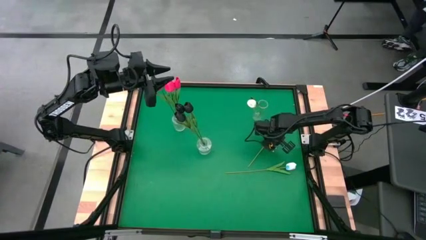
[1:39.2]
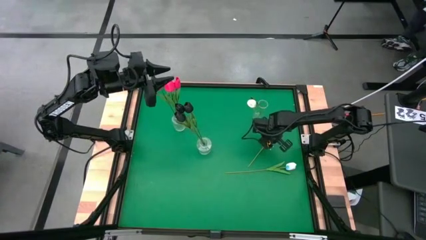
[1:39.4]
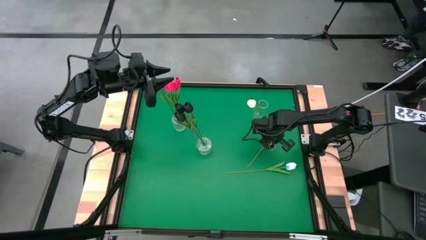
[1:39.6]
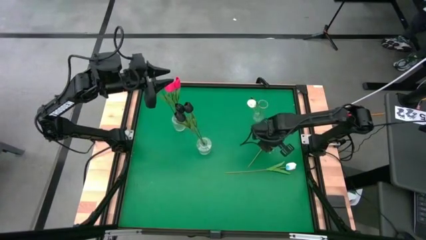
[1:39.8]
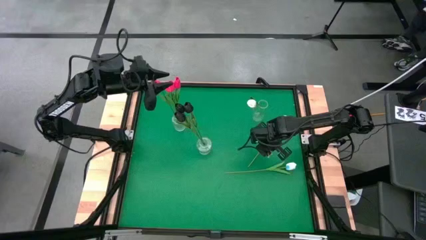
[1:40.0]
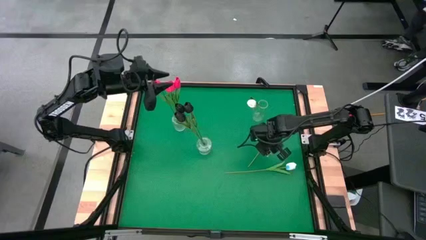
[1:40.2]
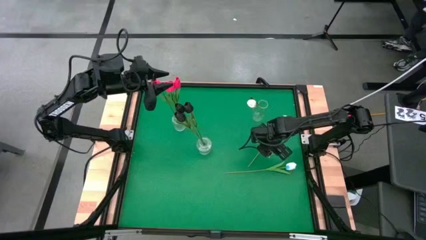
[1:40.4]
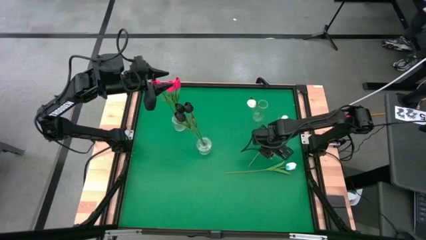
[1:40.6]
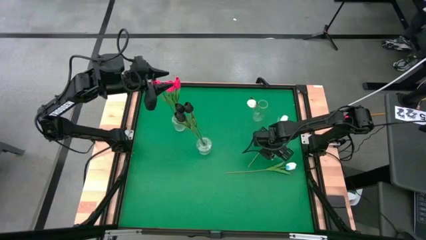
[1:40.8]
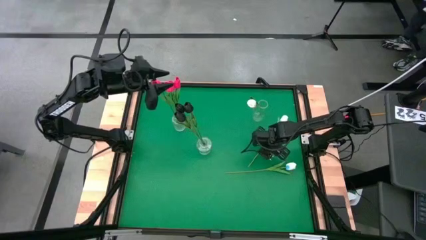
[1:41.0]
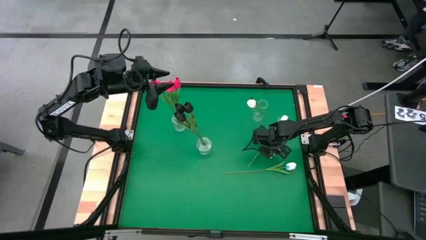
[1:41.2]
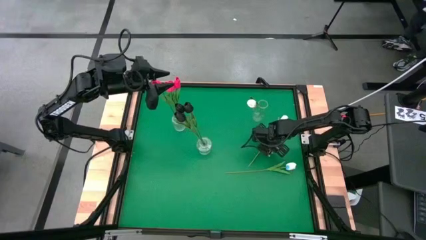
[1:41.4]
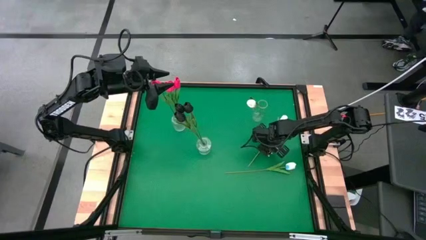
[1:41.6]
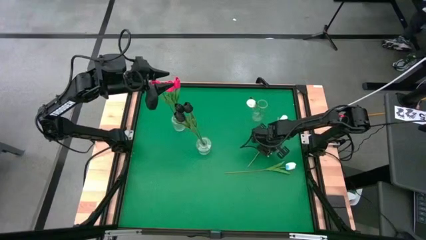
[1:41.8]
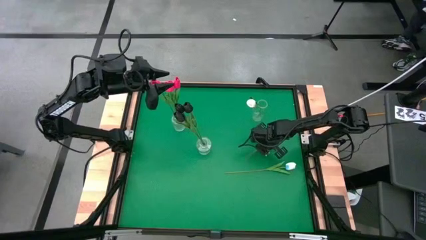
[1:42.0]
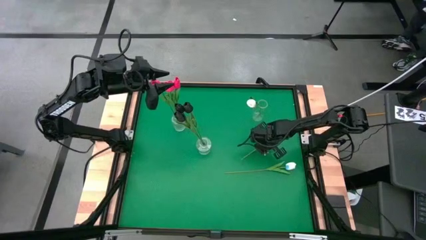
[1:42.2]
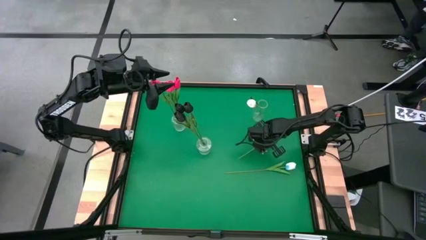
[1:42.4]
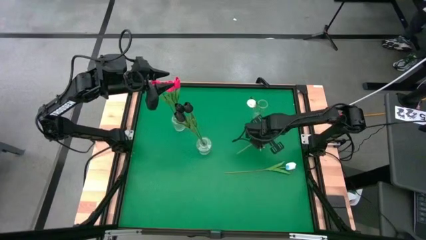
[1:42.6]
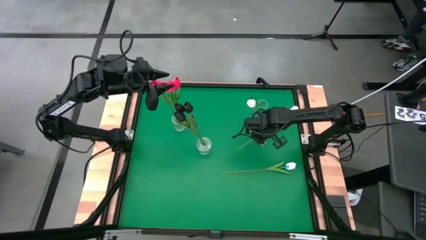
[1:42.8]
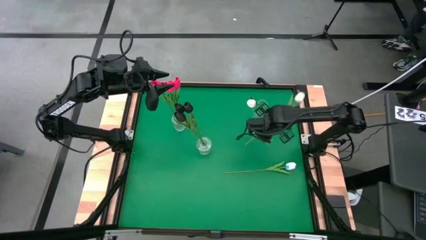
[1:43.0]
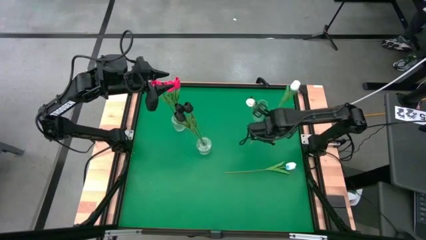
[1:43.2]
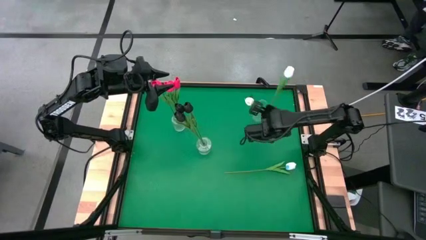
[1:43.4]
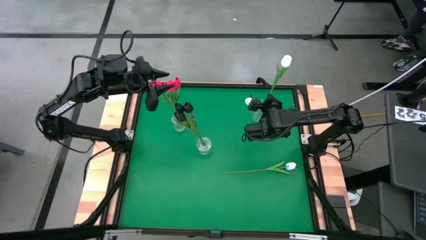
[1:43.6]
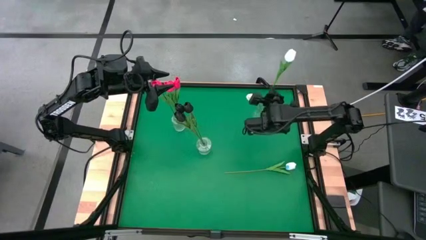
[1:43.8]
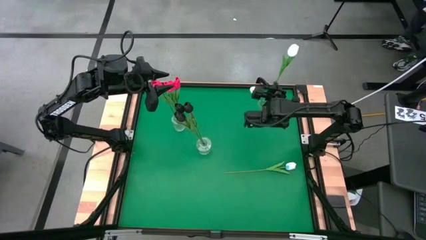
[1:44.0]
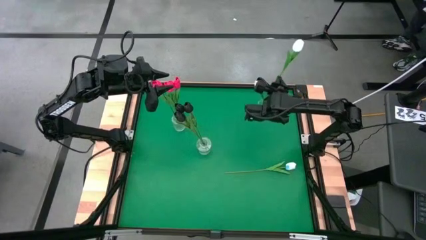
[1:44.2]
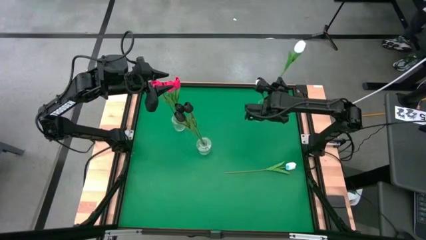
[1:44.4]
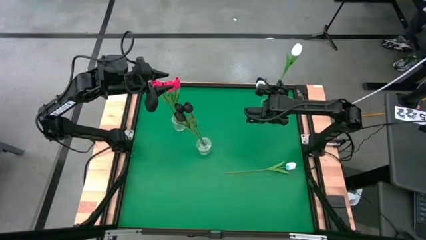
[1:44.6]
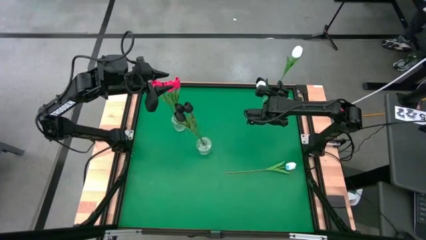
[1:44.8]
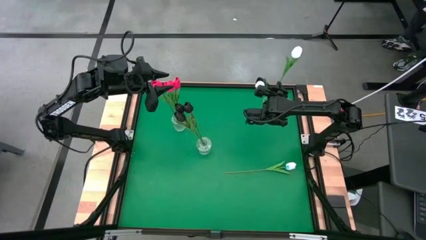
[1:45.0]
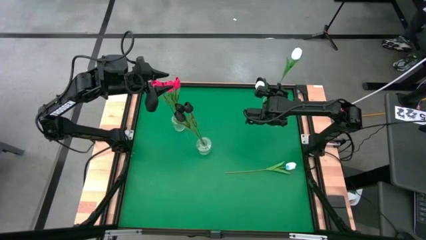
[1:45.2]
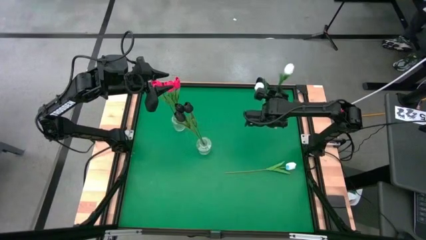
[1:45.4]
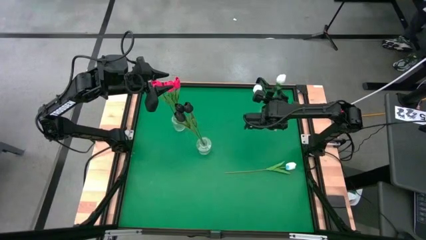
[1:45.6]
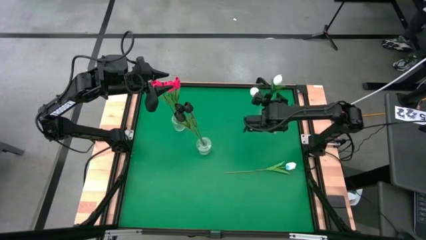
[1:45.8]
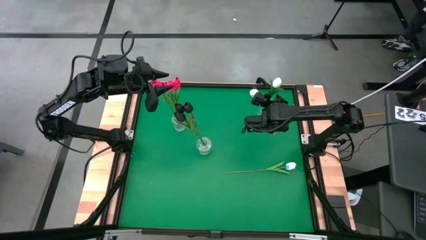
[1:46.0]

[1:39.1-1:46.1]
Task: Sort flowers into vase by color
Put the top white tulip into the top right transparent vase

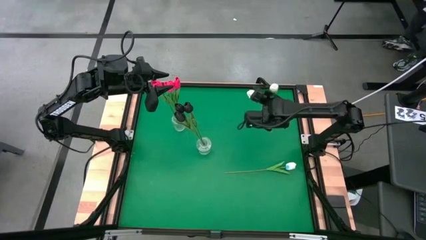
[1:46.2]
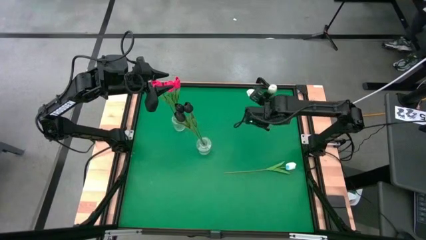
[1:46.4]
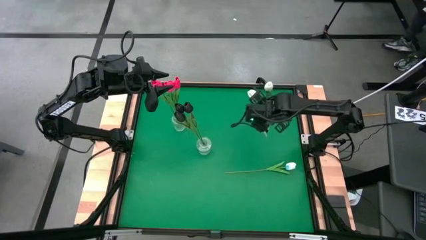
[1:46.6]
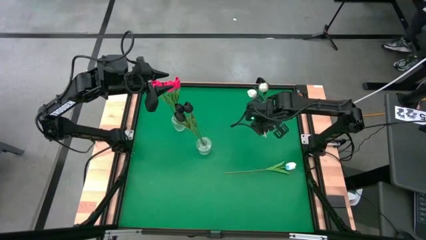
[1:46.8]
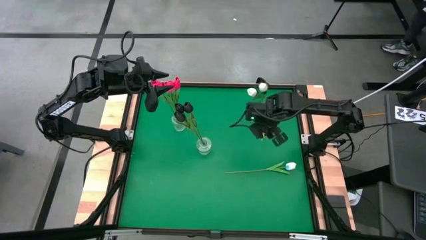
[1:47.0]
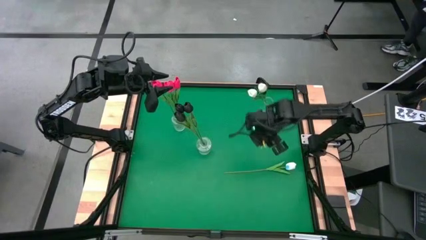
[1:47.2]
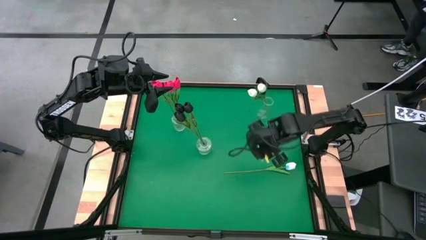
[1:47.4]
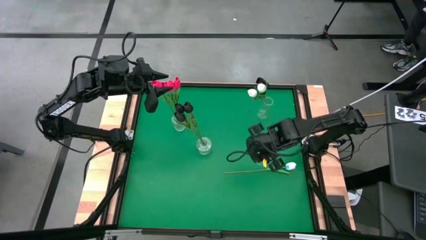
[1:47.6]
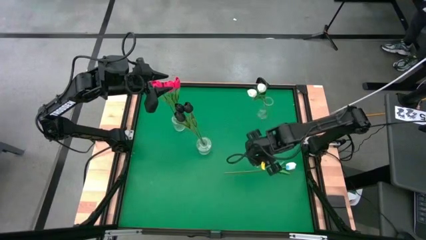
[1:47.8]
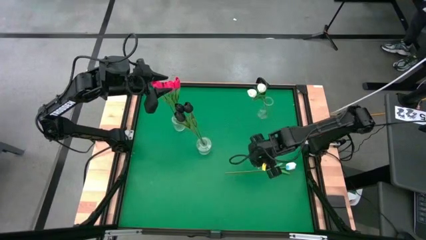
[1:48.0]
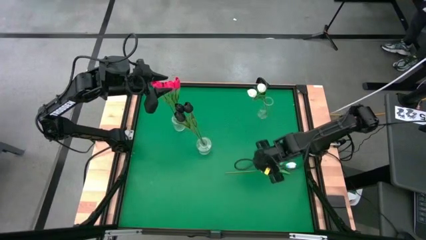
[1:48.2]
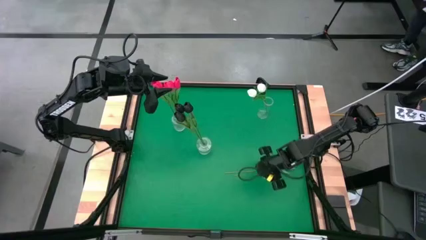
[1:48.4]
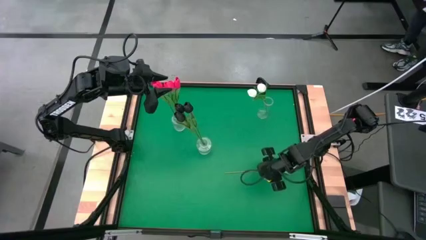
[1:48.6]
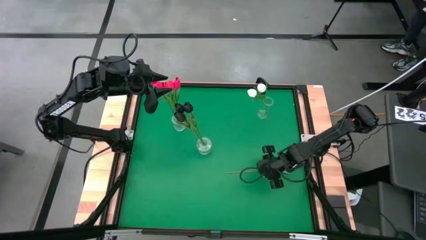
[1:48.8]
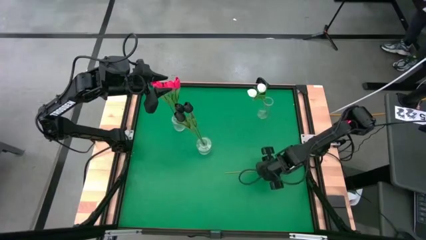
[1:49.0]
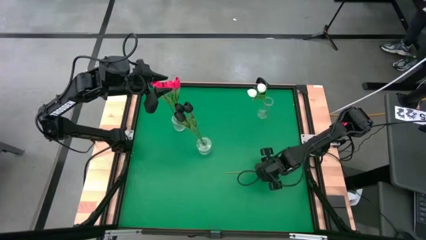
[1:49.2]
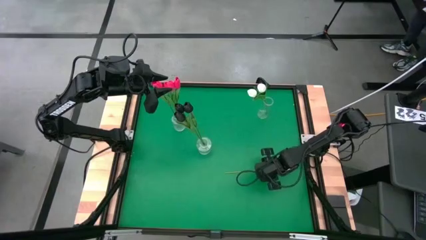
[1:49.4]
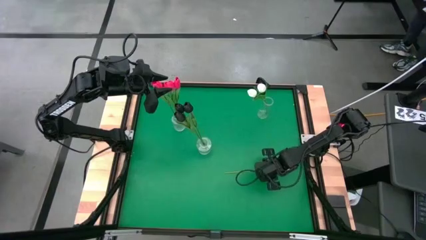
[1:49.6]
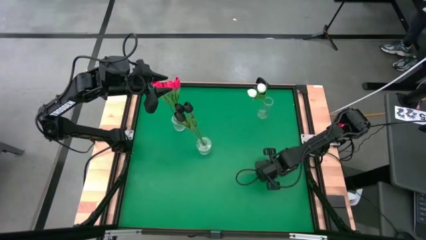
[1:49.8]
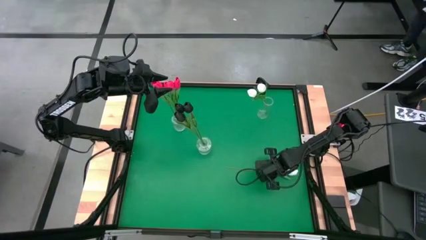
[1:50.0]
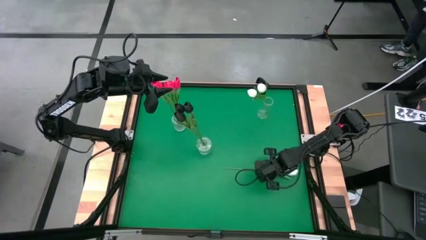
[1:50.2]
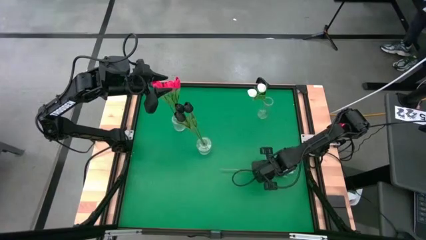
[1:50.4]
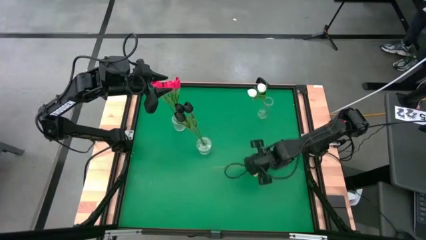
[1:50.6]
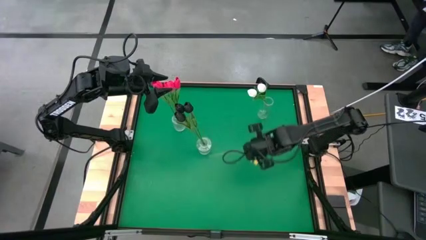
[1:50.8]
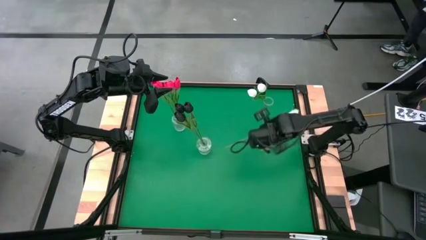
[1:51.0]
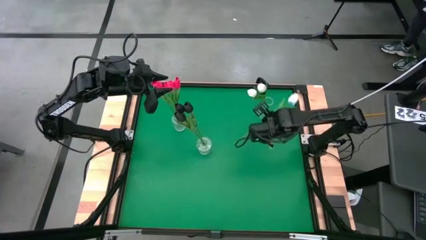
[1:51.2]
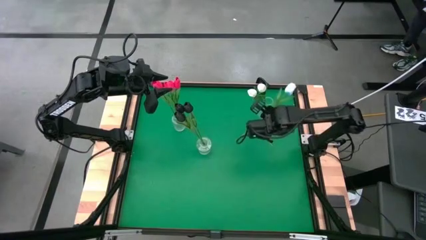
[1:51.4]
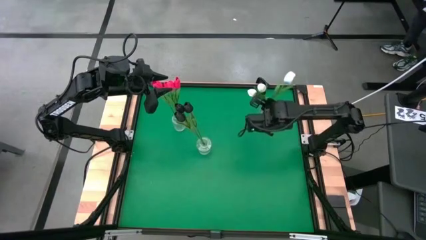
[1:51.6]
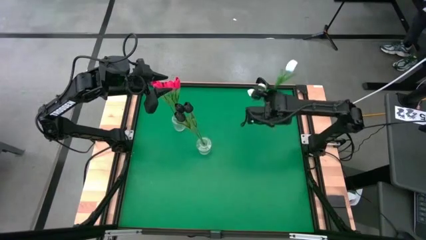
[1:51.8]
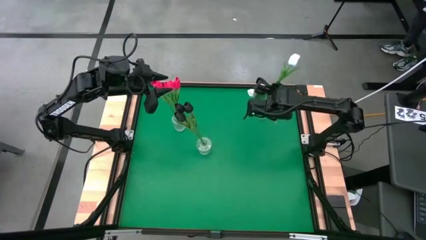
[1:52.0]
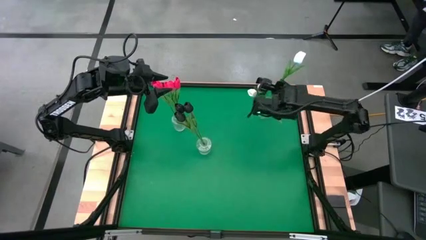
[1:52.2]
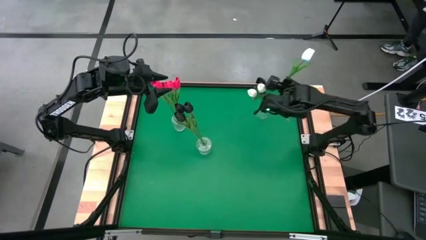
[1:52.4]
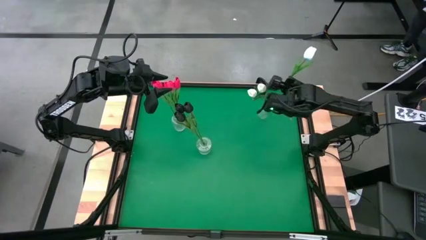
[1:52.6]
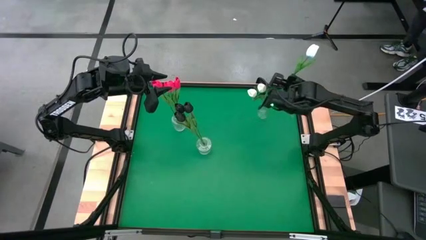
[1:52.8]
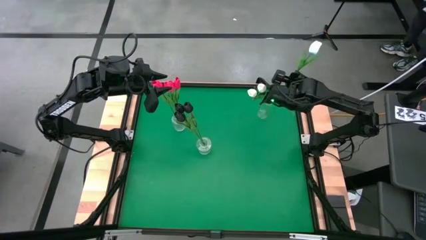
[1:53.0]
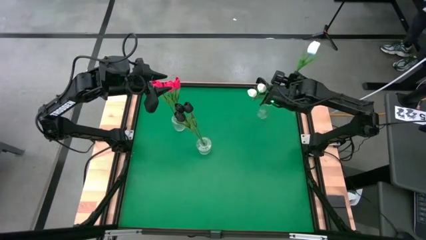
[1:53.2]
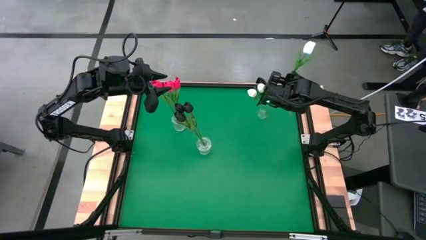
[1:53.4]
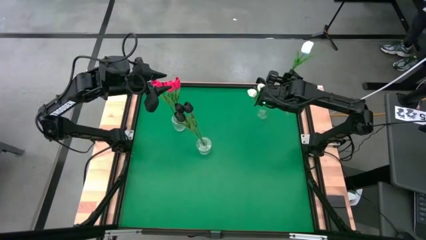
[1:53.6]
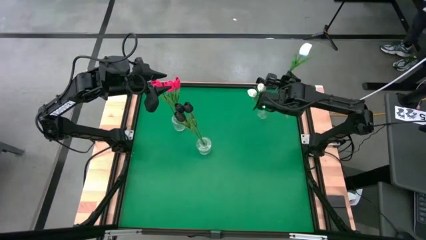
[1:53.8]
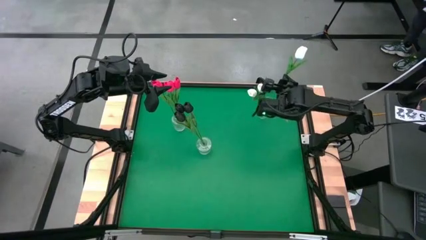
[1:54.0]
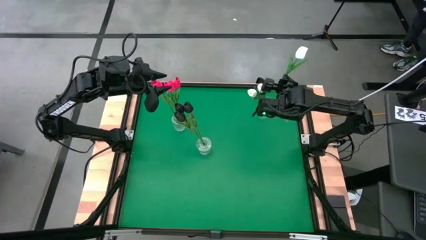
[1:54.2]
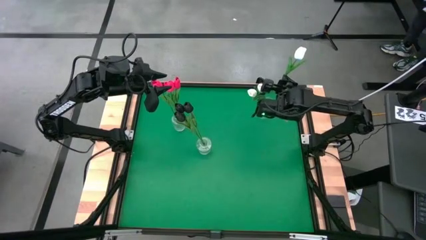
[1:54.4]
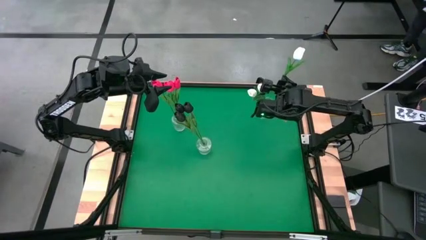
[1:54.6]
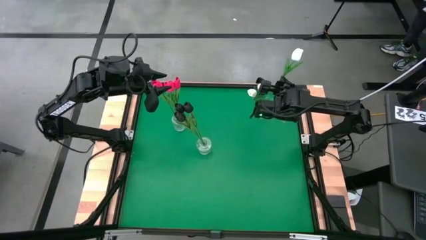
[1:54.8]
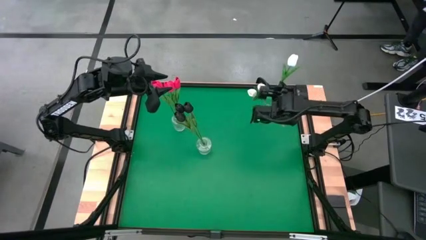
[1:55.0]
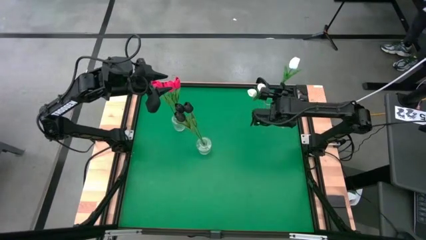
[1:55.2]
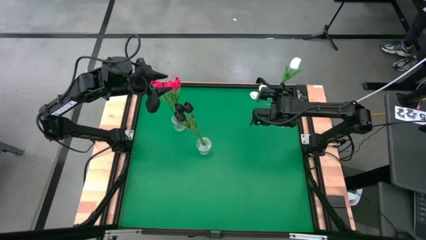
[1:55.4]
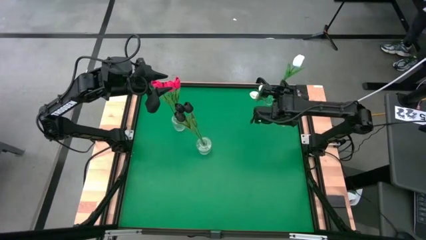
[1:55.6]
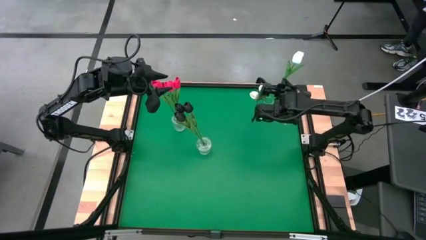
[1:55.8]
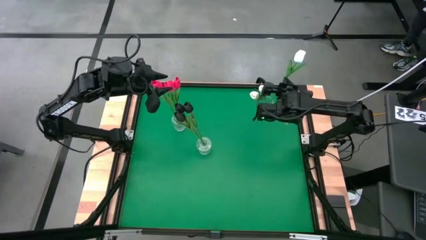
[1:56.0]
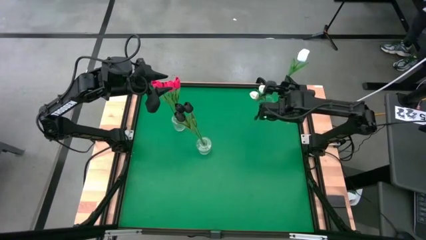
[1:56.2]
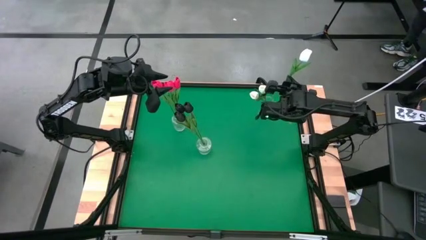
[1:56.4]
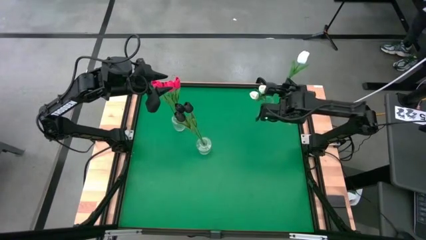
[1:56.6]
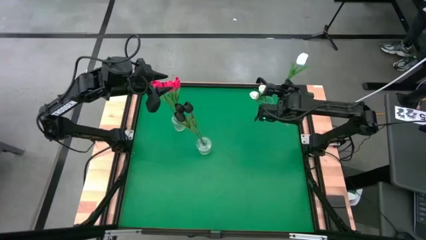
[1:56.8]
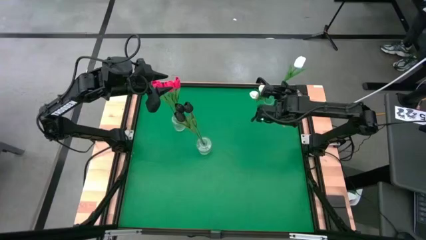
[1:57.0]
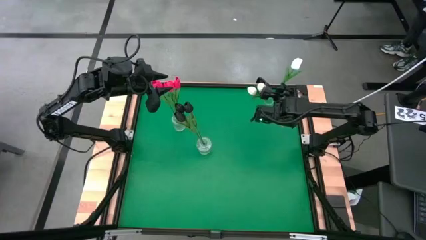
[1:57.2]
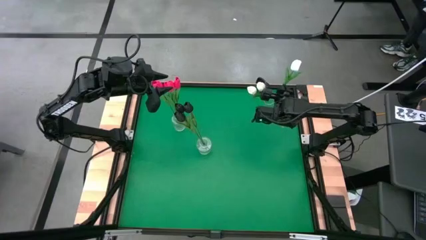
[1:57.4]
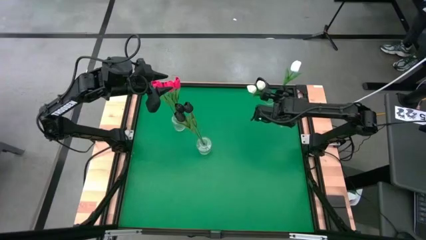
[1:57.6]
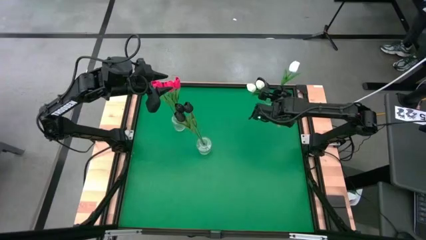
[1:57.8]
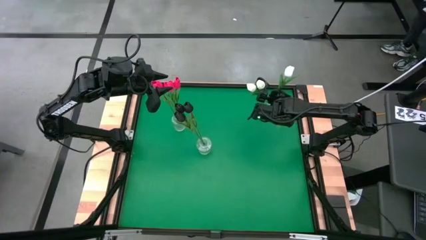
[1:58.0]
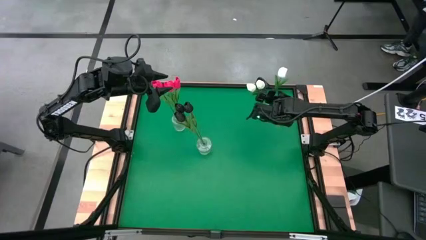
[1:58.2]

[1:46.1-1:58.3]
Put the white tulip into the top right transparent vase
